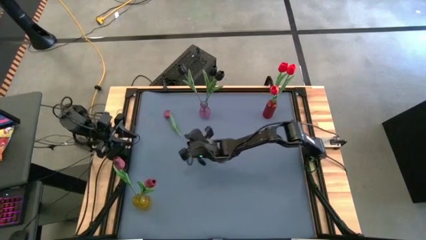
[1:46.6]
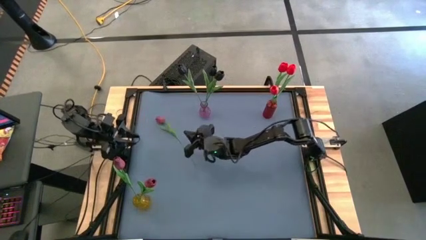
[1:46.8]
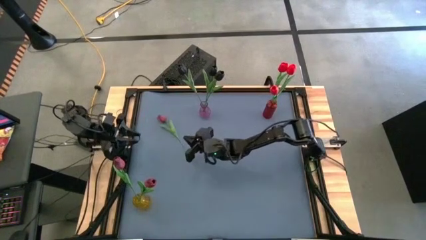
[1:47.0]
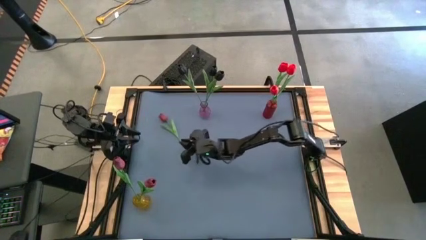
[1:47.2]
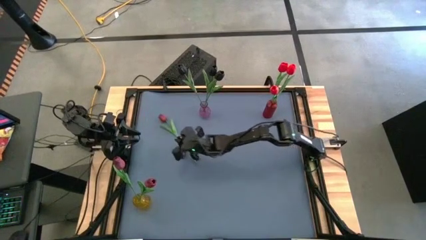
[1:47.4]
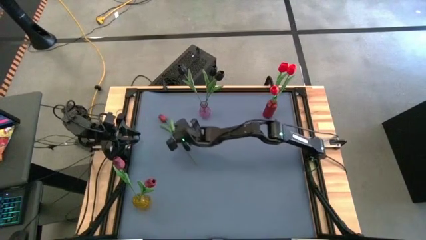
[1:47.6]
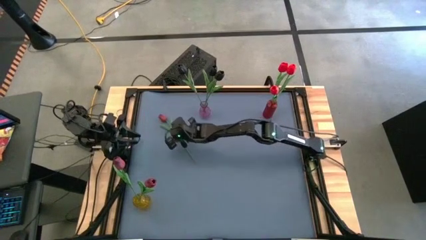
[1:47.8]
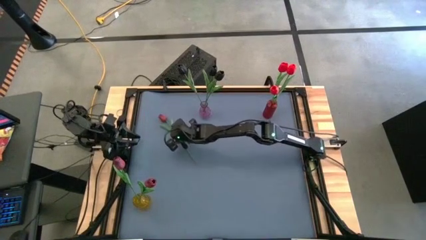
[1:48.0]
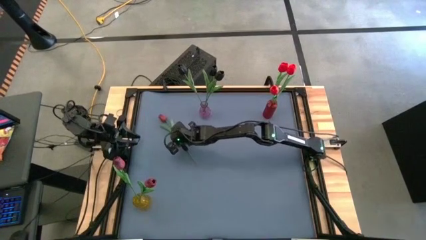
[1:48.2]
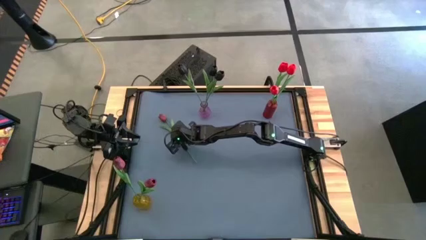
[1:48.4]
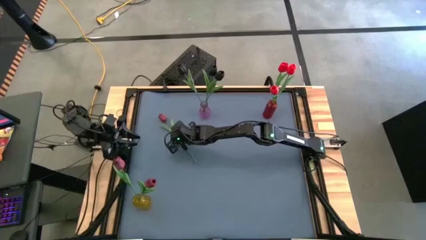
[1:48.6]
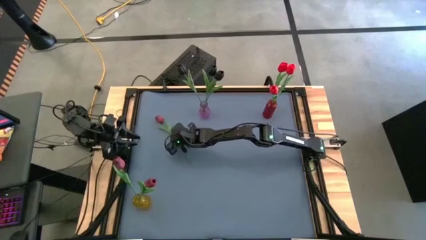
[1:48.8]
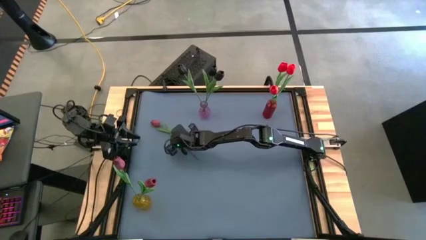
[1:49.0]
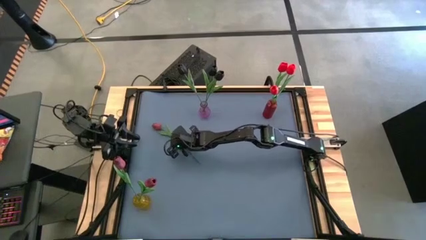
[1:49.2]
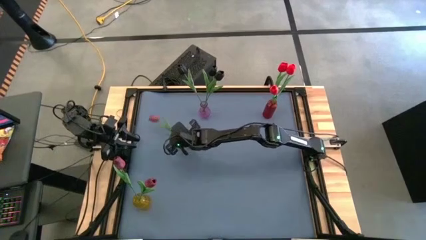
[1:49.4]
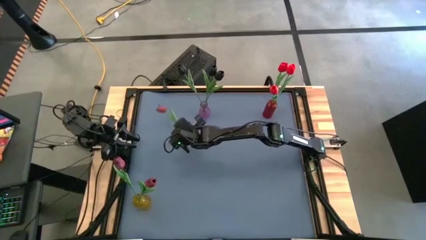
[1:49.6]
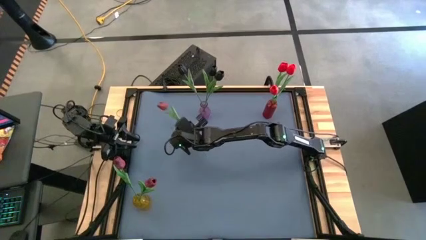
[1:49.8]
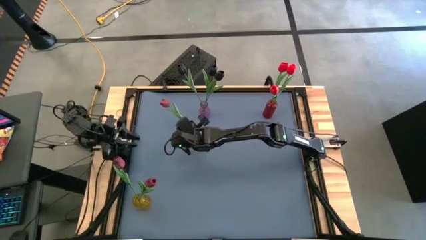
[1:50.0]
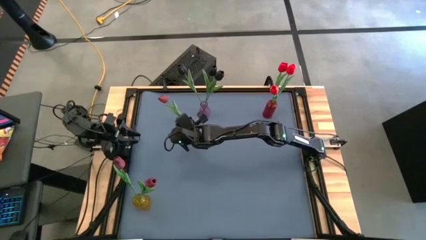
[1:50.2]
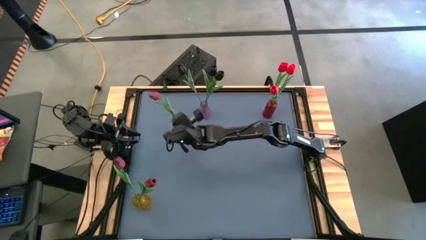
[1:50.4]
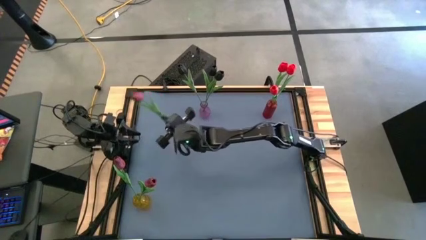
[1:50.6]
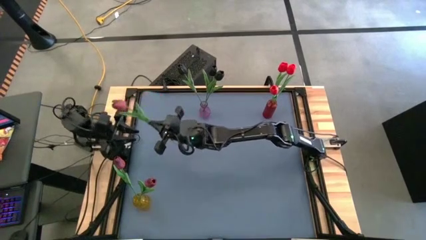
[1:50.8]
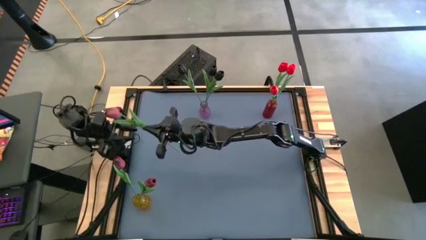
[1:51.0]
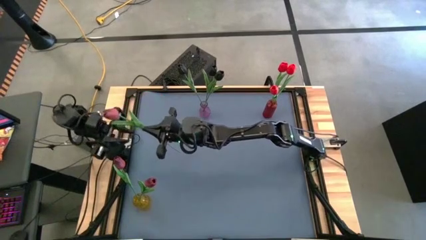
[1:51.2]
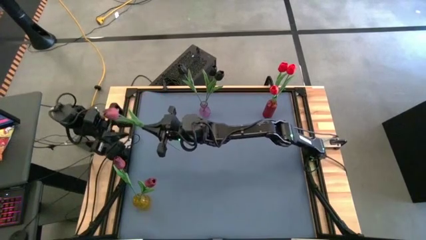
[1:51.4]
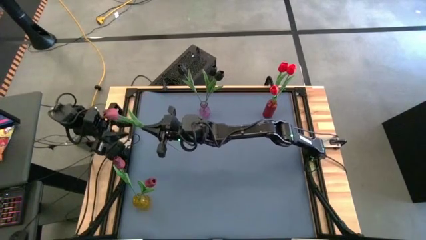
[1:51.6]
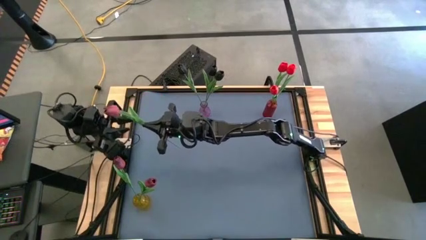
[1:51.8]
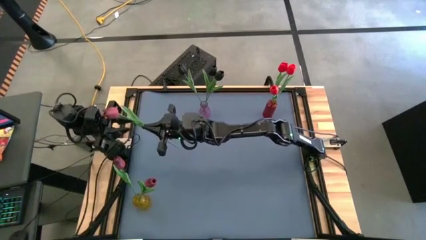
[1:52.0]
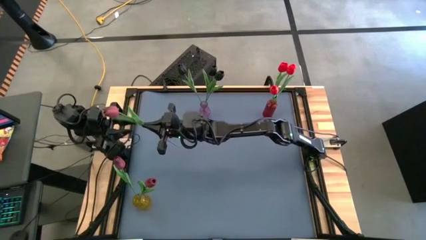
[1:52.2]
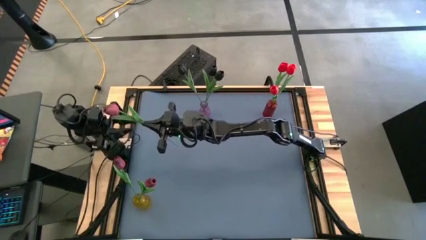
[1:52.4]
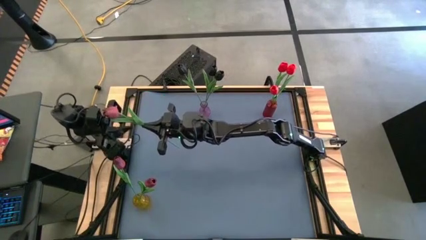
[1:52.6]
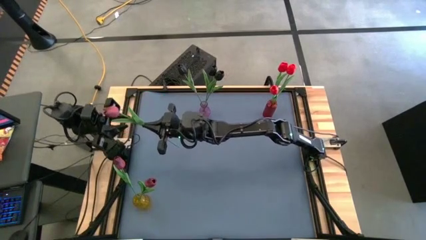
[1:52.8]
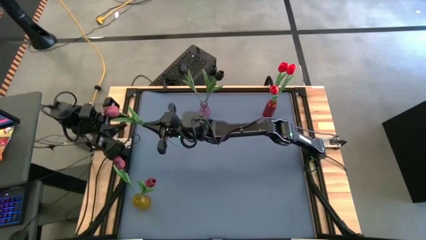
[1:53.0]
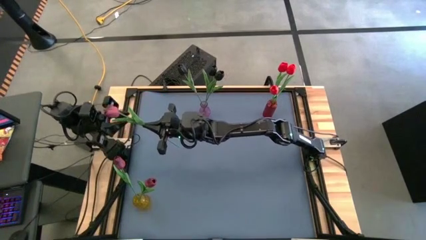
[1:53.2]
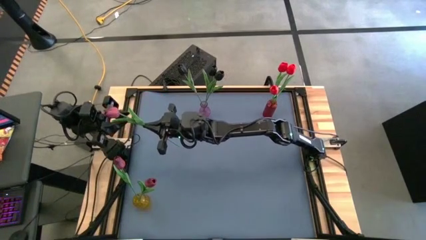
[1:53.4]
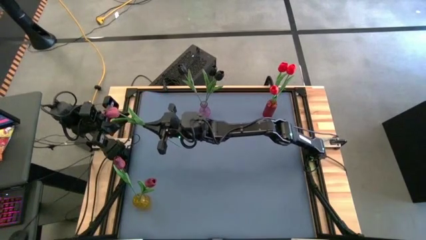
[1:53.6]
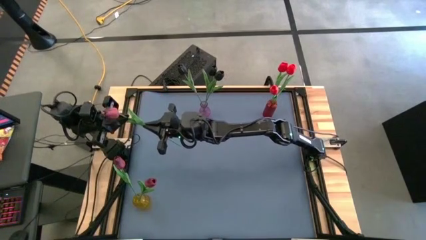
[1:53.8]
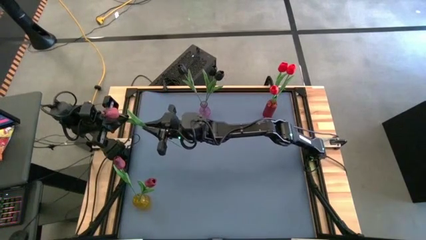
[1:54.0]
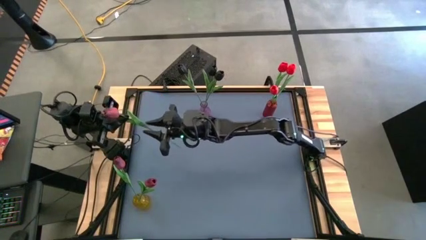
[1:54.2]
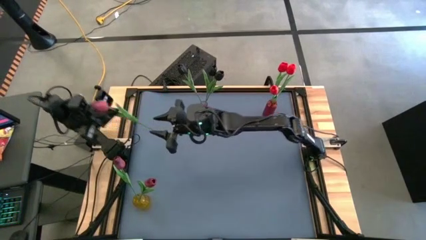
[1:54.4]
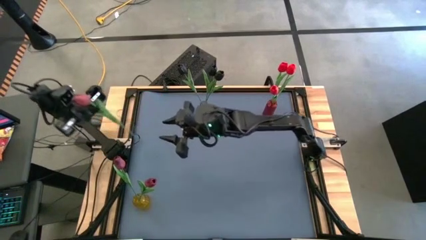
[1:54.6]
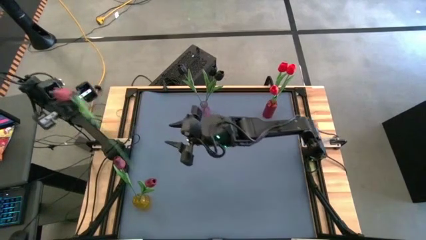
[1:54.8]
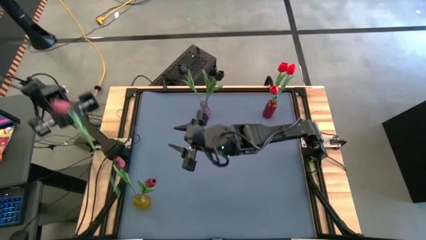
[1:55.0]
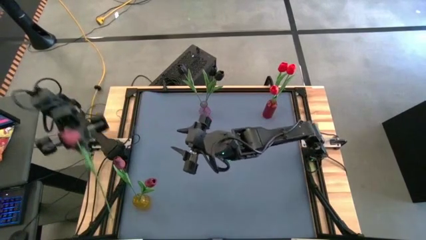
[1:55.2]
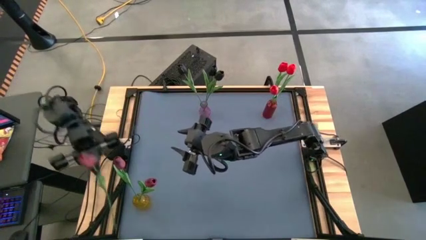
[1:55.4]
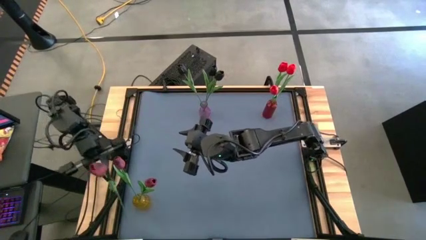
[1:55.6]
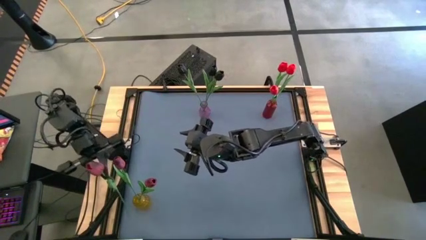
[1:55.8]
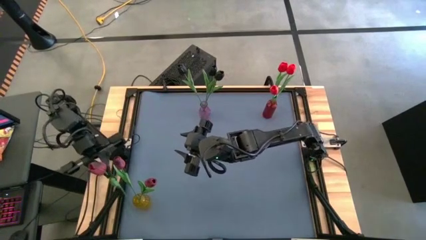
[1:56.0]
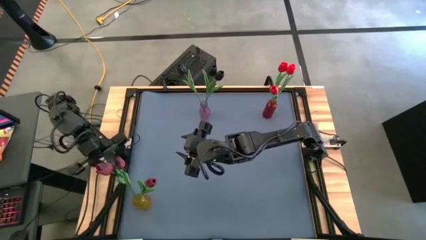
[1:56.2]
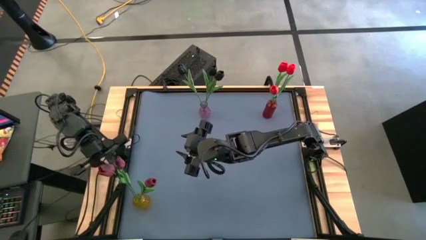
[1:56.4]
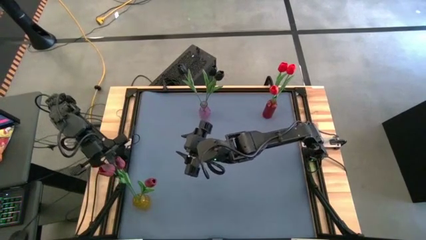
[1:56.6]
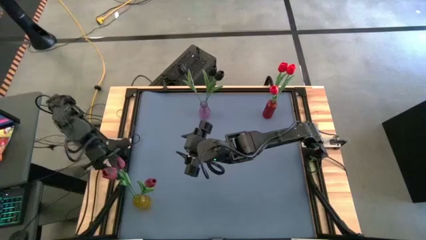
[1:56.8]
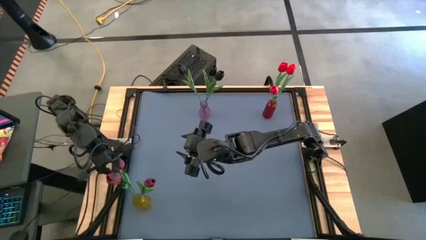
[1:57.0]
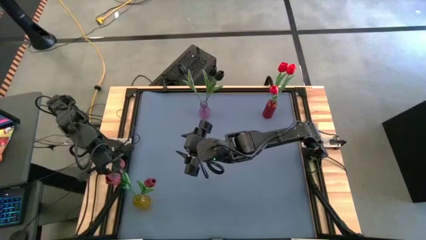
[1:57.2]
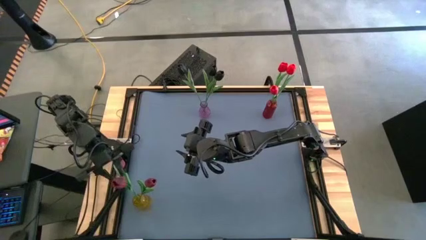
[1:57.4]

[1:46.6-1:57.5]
Task: Sort flowers into vase by color
Put the dark red flower into the yellow vase
